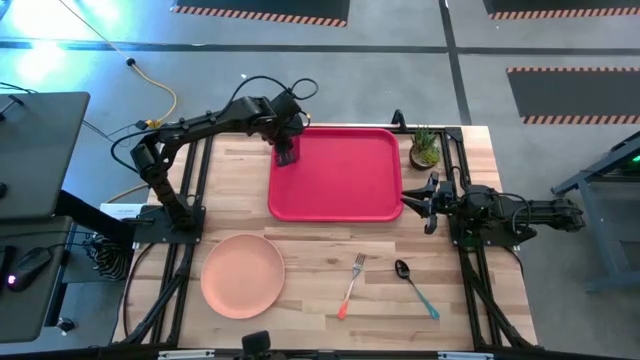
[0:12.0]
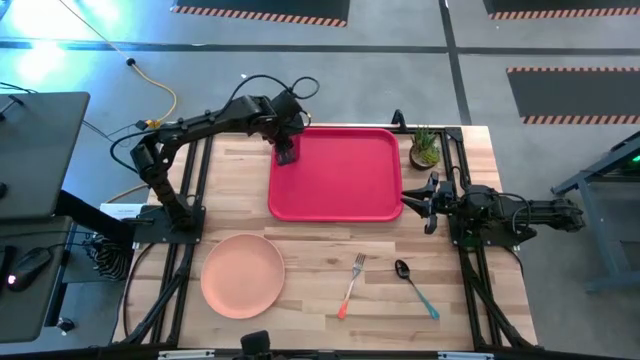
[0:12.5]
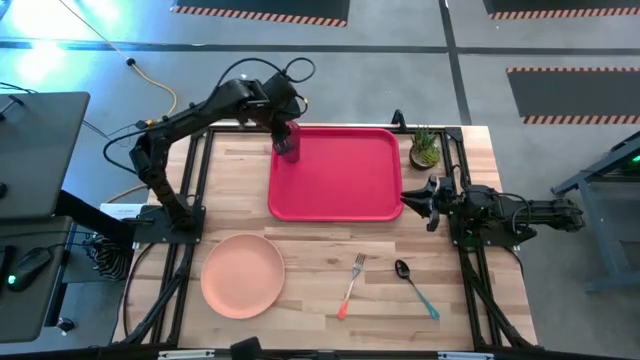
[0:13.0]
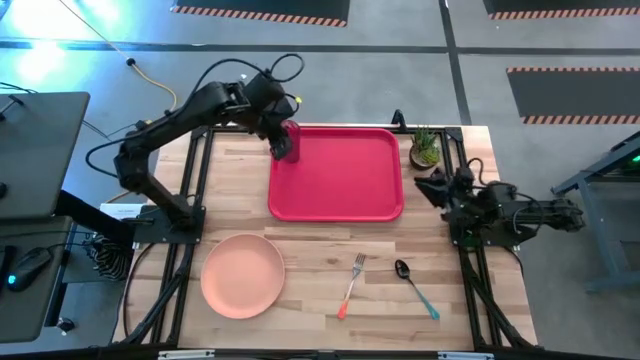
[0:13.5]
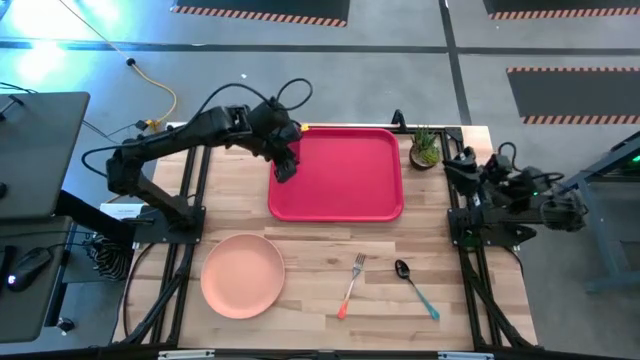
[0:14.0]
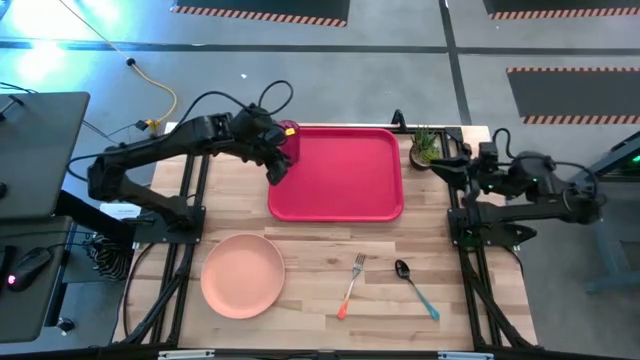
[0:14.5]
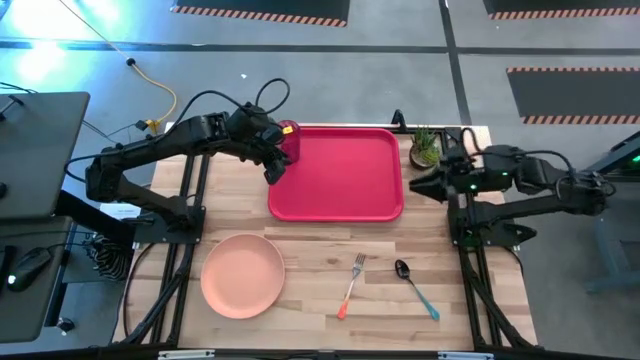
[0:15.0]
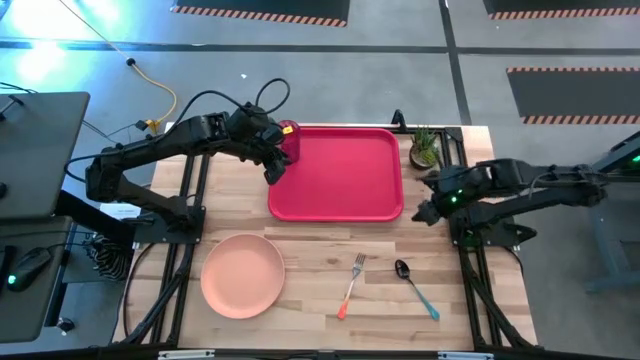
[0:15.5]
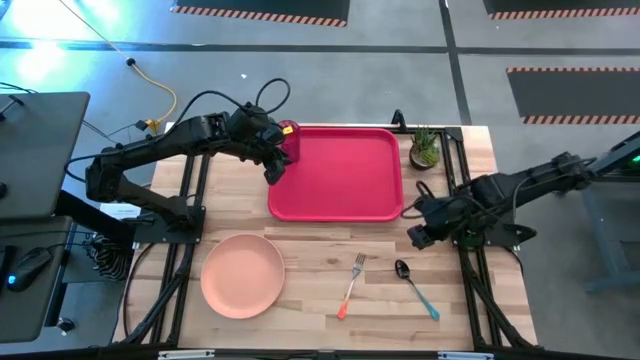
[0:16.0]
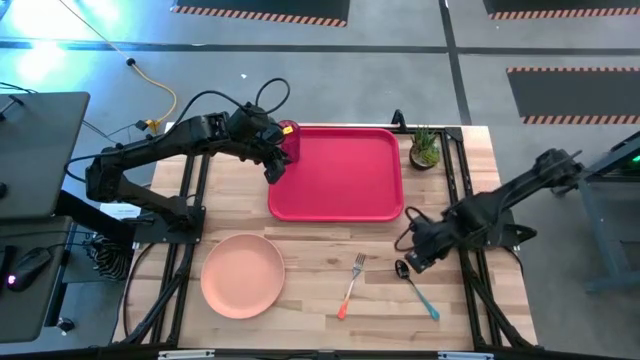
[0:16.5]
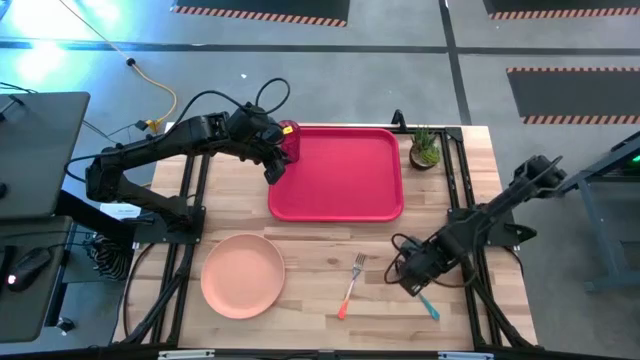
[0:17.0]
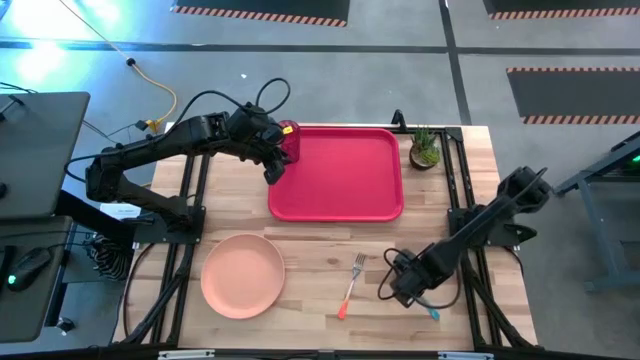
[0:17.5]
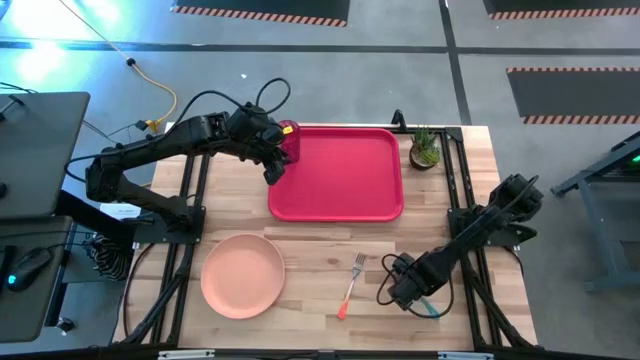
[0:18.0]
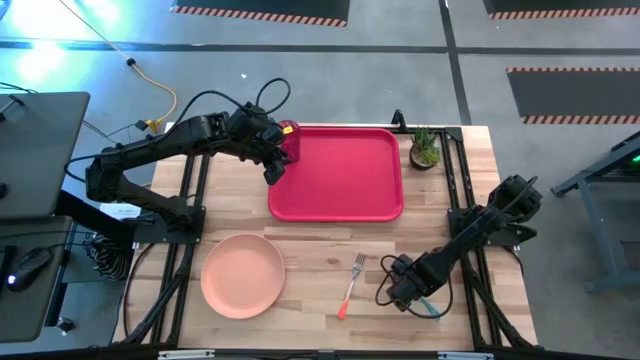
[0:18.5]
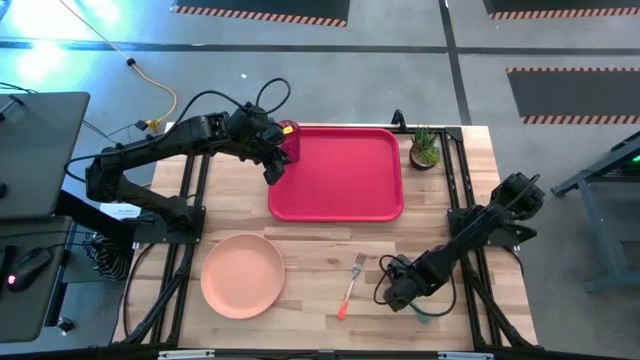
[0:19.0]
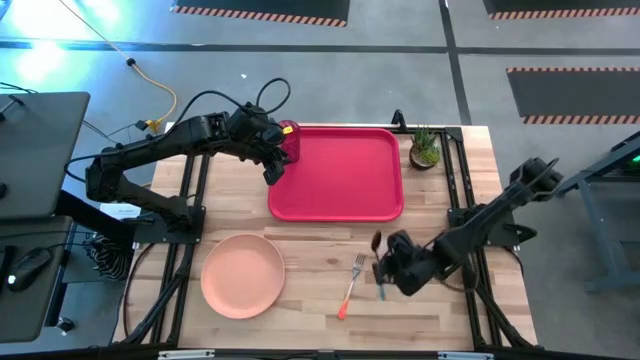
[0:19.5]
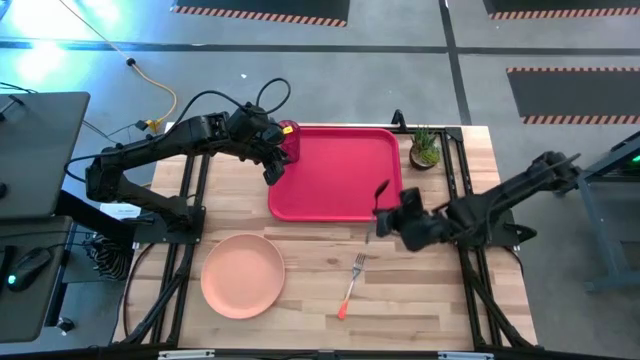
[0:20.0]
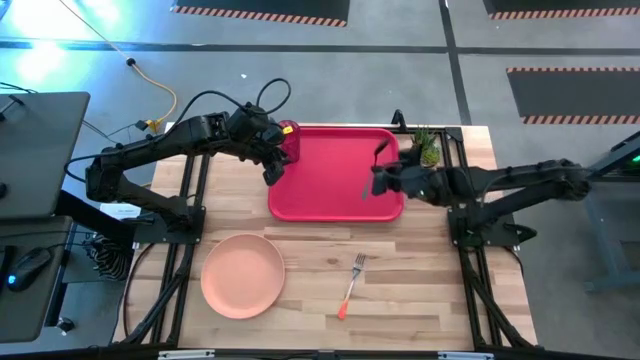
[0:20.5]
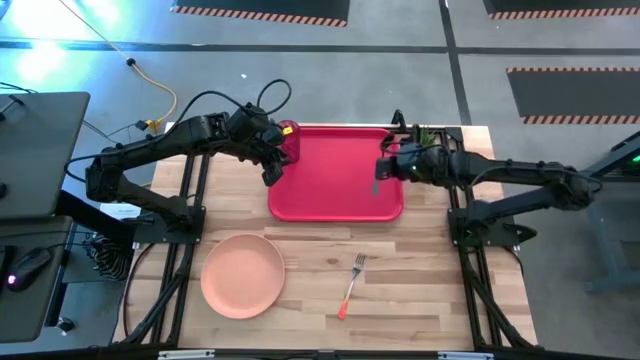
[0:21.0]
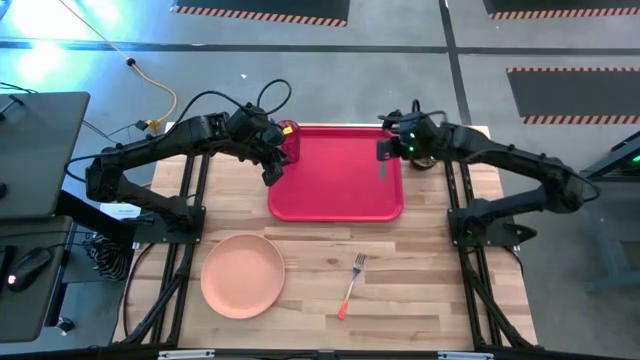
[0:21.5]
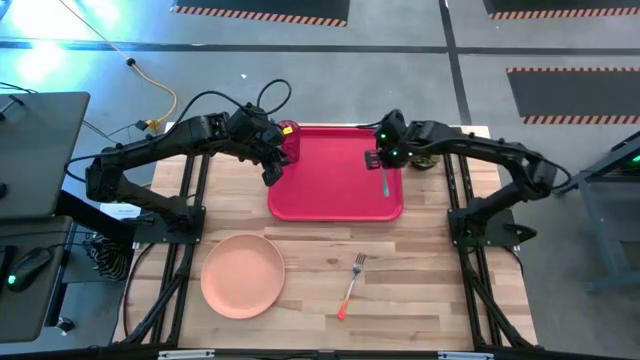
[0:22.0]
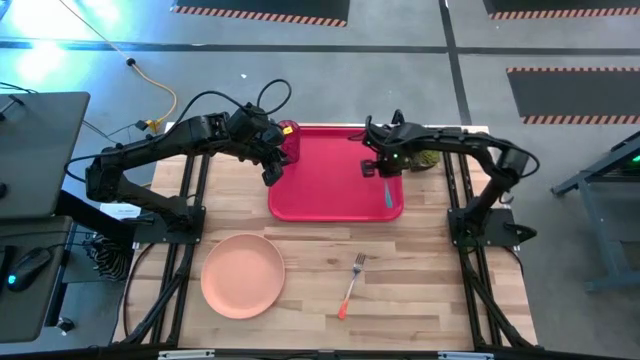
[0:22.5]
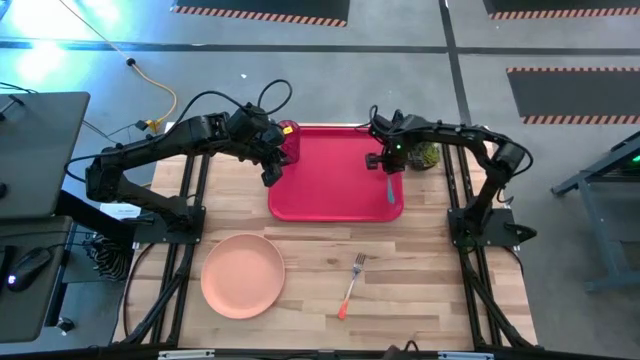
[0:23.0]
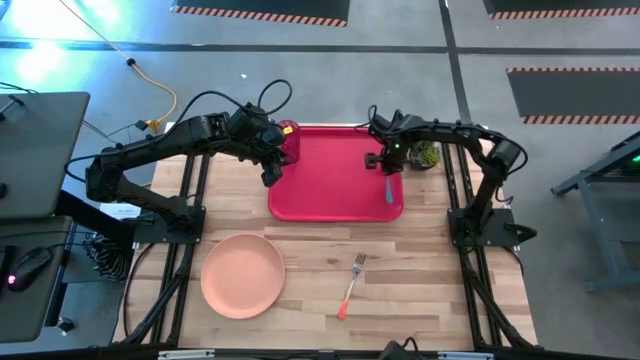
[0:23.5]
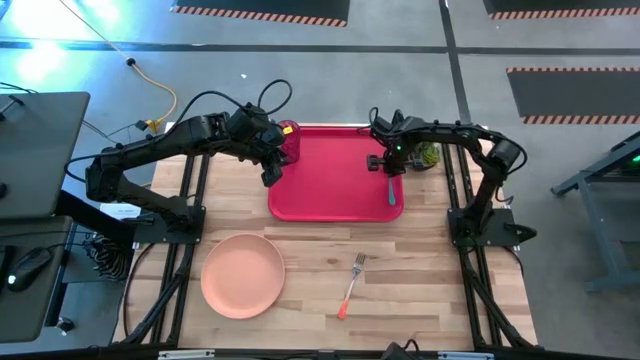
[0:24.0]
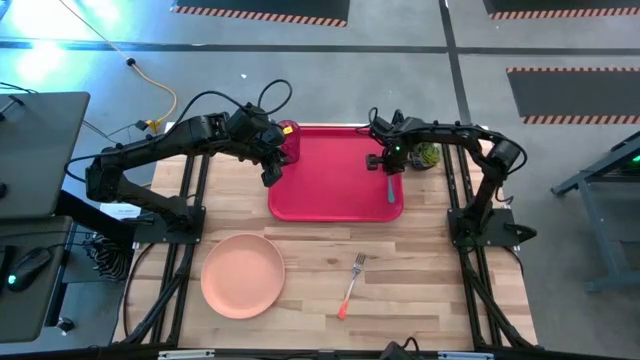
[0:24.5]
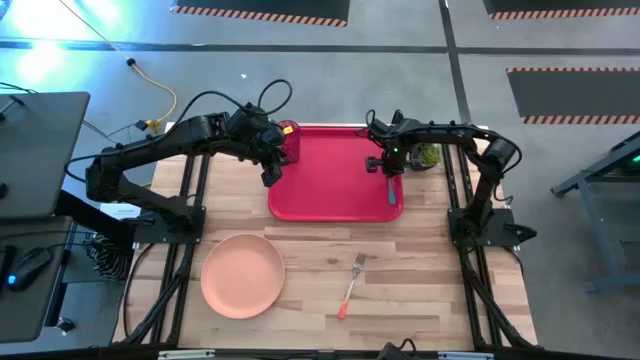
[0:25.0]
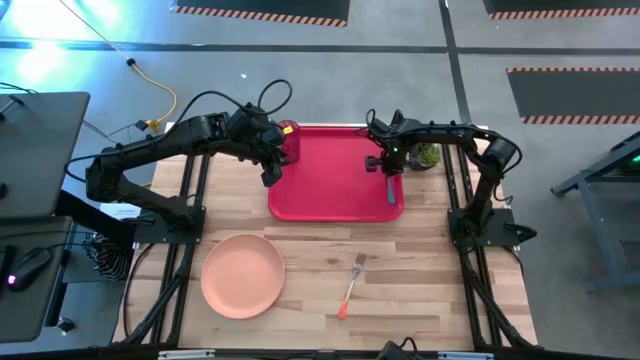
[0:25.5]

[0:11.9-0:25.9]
Task: Pick and place plate/cup/fork/spoon on tray
Put the blue spoon on the right of the red tray

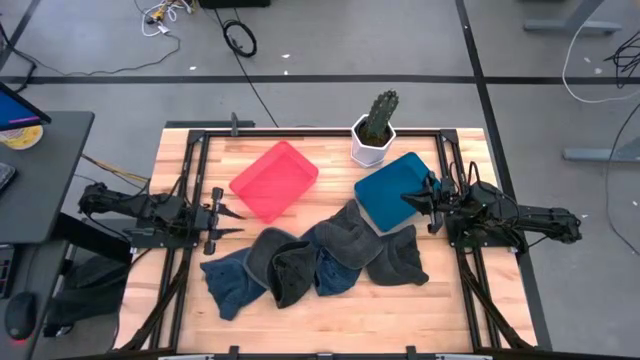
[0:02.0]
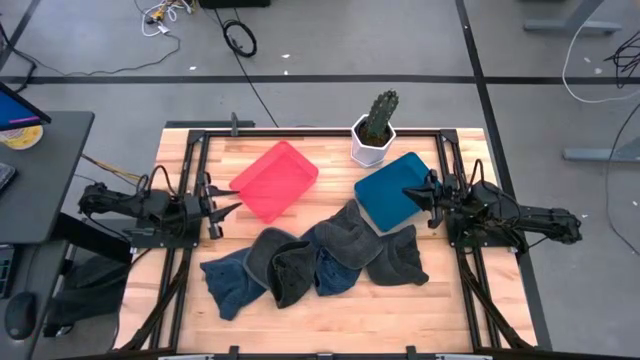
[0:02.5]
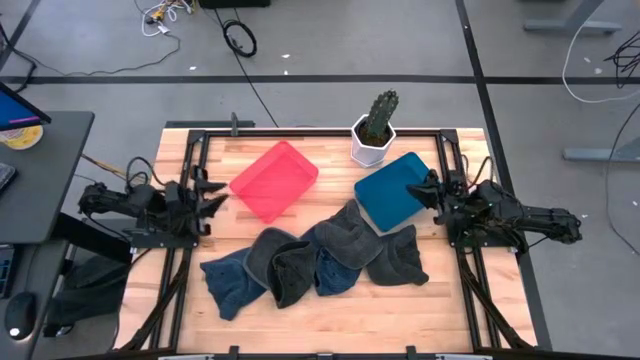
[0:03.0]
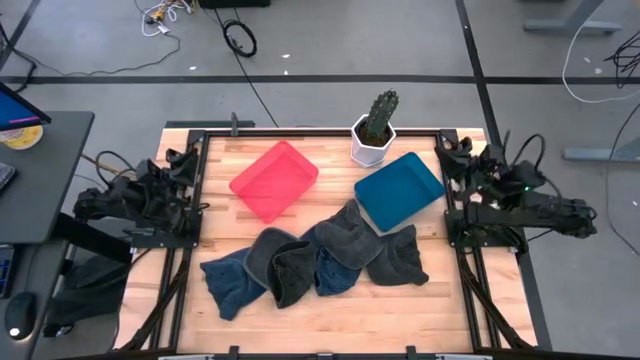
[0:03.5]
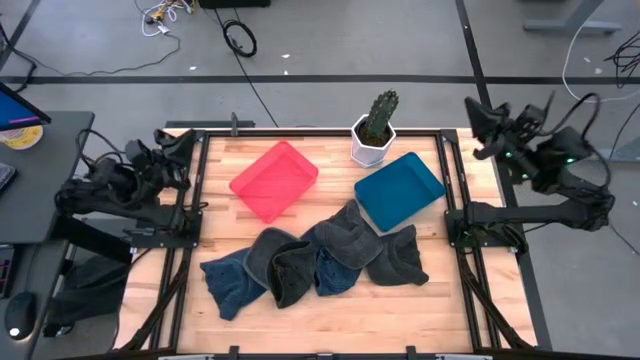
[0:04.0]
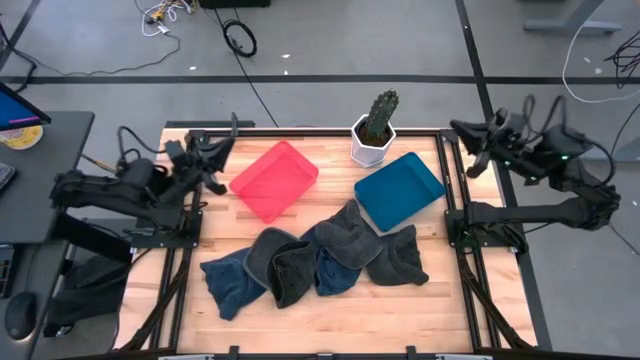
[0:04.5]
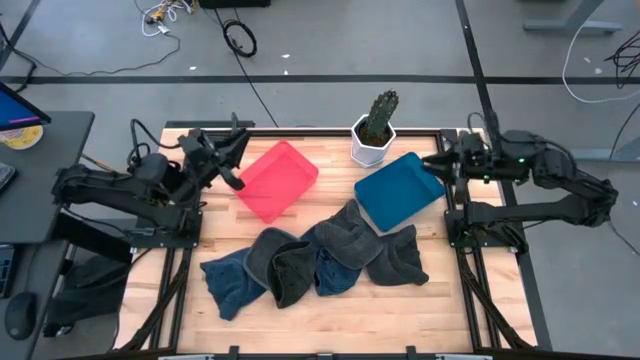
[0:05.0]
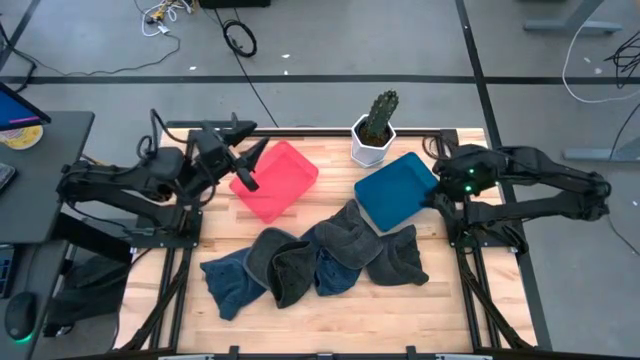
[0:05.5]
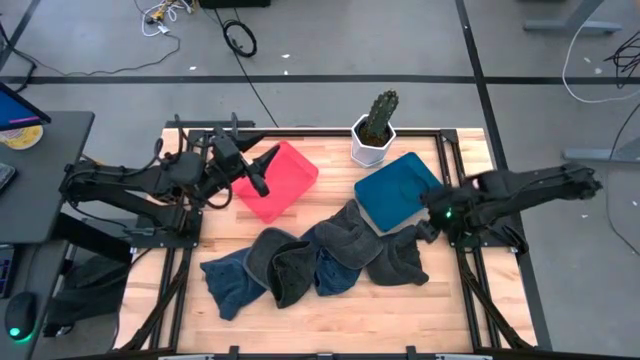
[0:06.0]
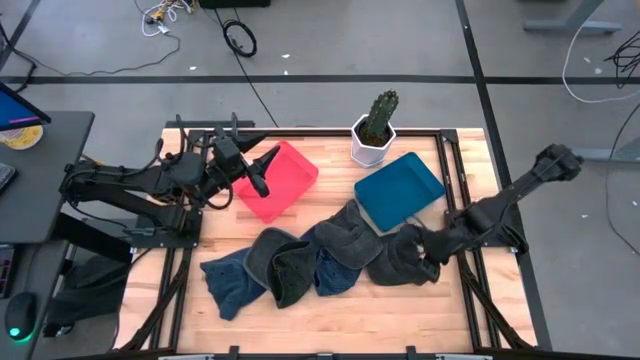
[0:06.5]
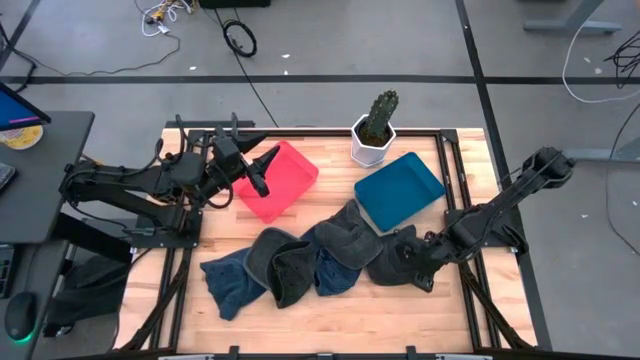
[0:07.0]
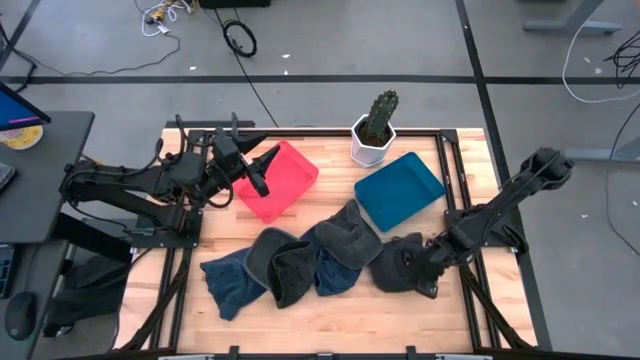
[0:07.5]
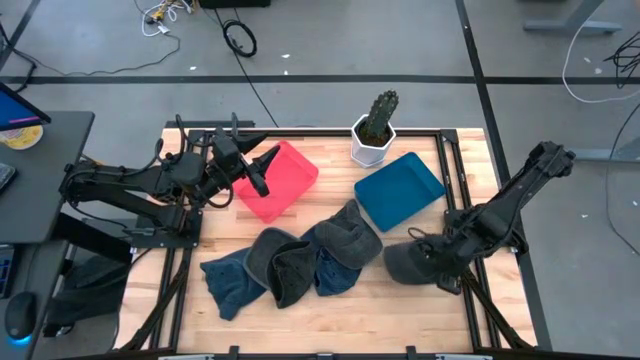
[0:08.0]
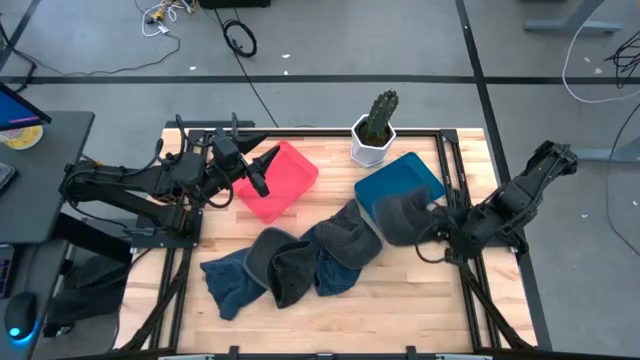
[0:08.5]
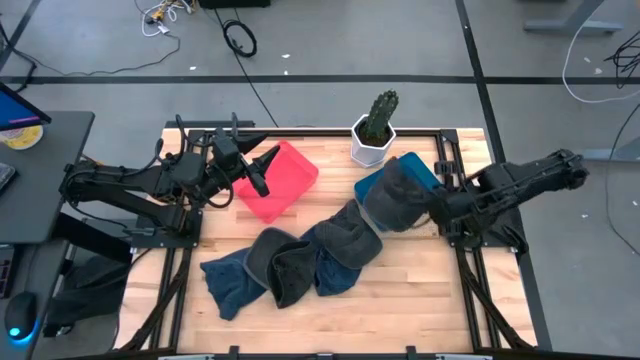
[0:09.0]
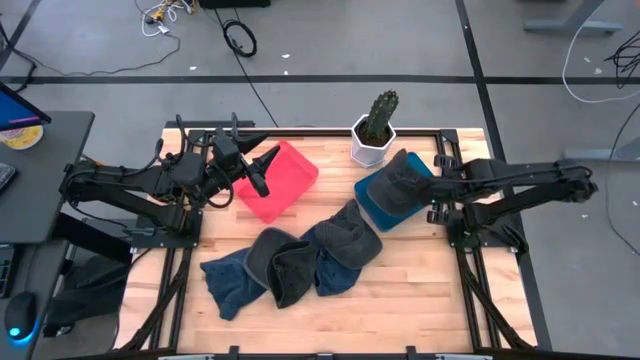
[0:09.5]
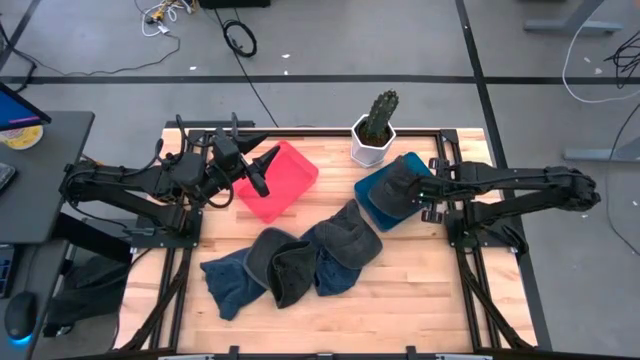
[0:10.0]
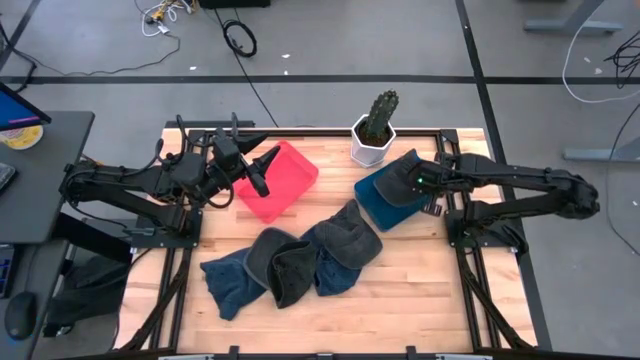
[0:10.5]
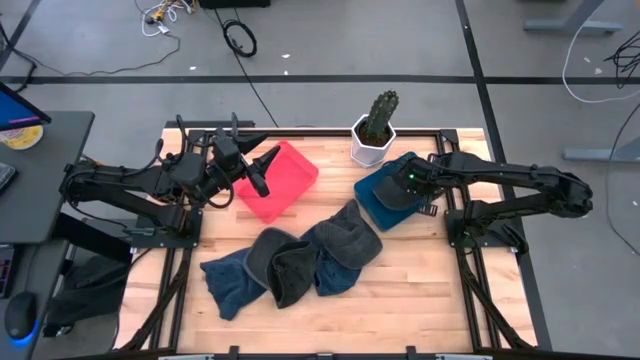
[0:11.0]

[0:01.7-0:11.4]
Task: Pick & Place hat
Put the right black cap into the blue bin
